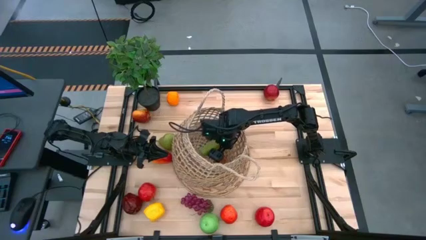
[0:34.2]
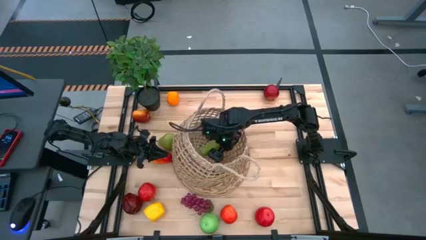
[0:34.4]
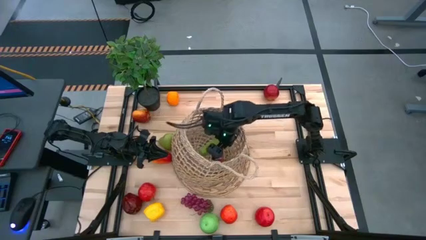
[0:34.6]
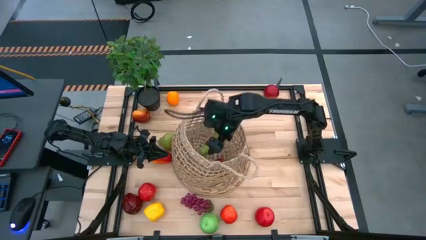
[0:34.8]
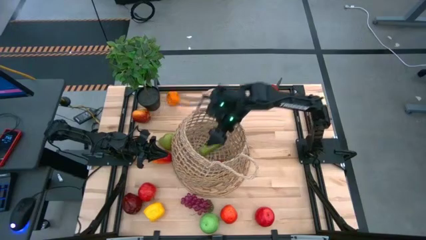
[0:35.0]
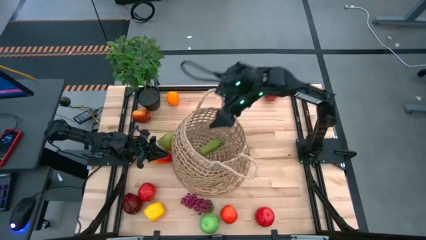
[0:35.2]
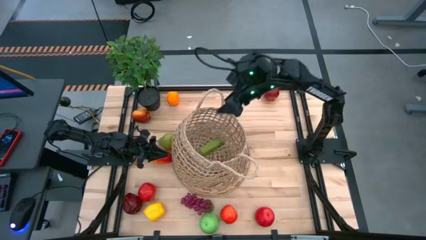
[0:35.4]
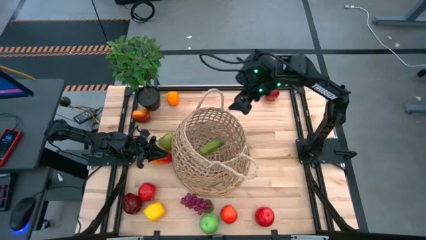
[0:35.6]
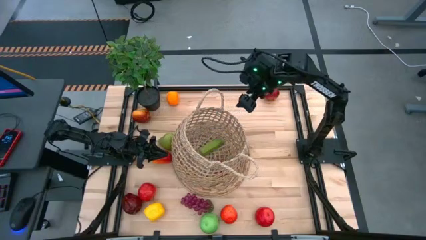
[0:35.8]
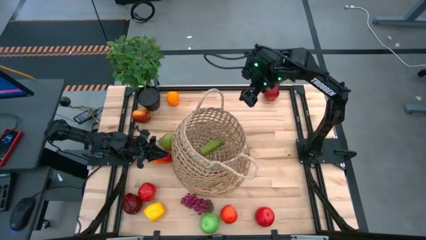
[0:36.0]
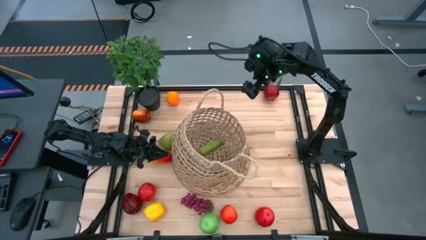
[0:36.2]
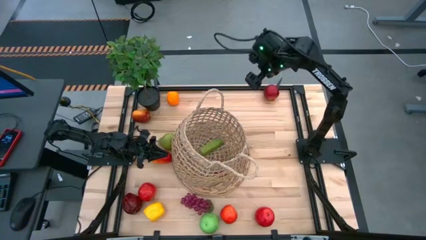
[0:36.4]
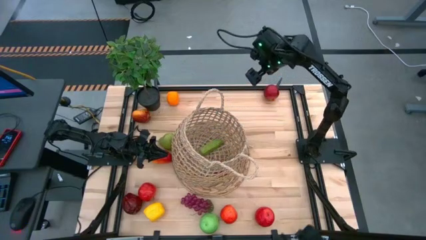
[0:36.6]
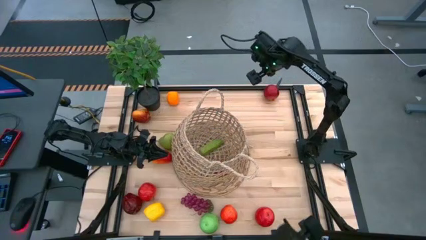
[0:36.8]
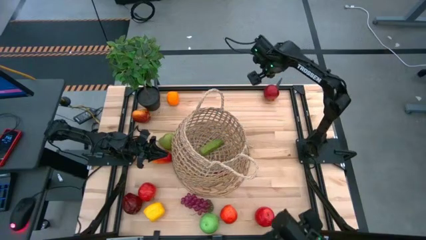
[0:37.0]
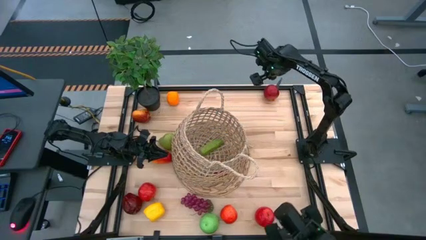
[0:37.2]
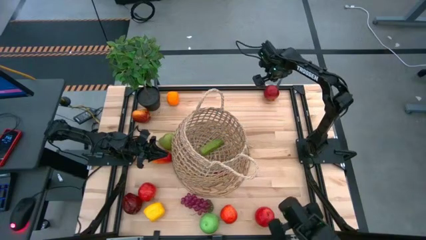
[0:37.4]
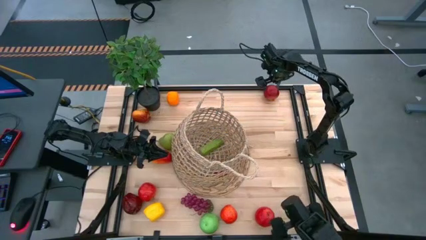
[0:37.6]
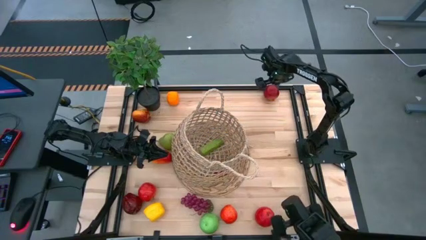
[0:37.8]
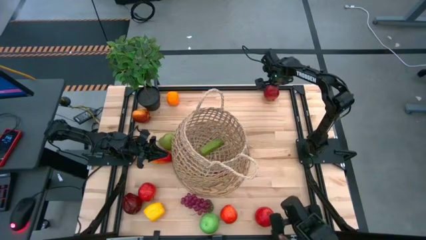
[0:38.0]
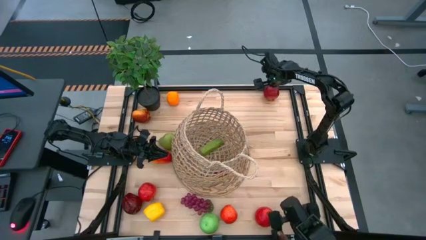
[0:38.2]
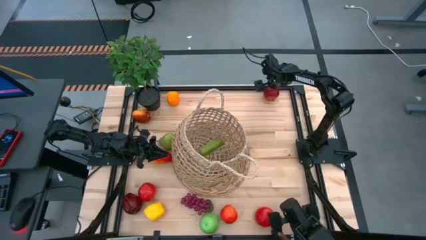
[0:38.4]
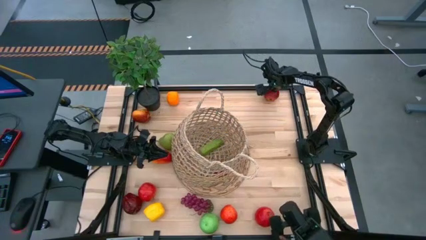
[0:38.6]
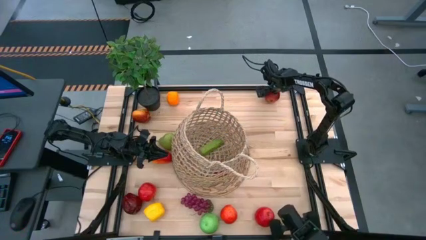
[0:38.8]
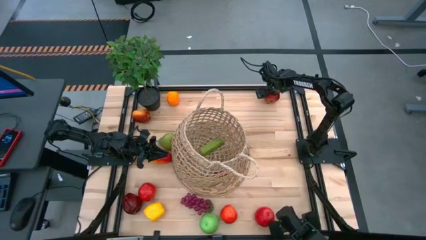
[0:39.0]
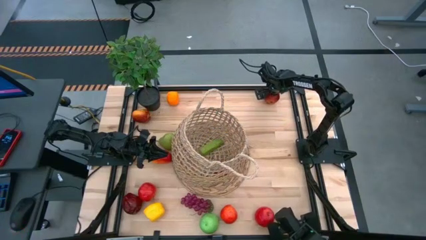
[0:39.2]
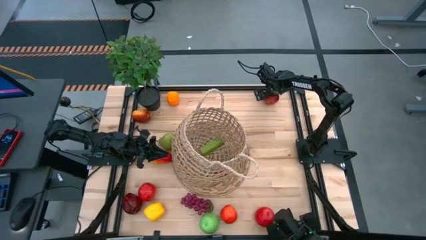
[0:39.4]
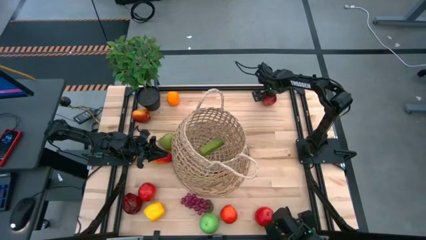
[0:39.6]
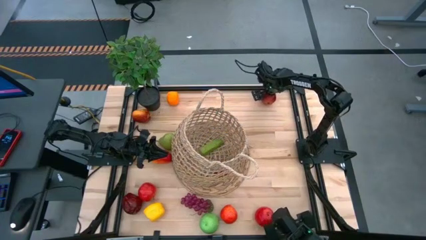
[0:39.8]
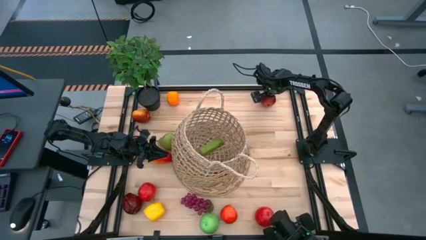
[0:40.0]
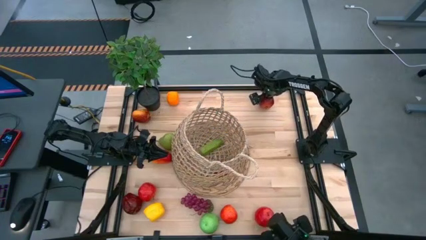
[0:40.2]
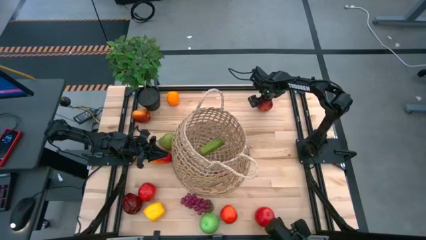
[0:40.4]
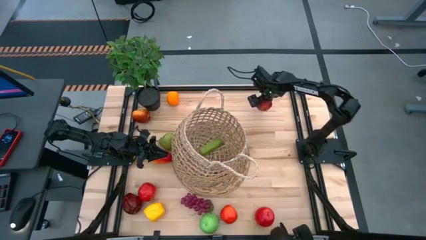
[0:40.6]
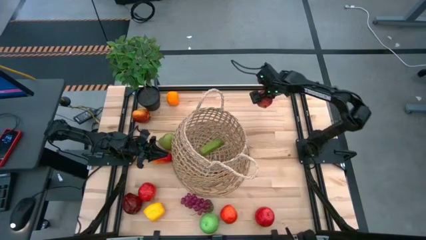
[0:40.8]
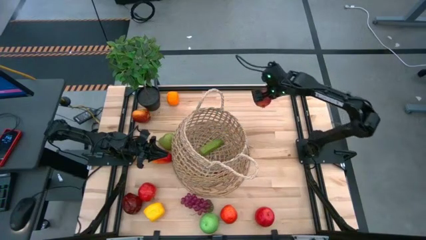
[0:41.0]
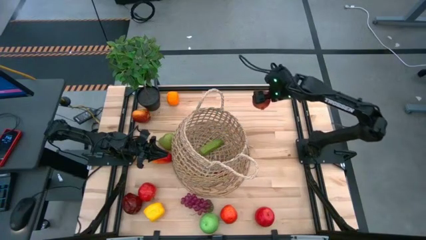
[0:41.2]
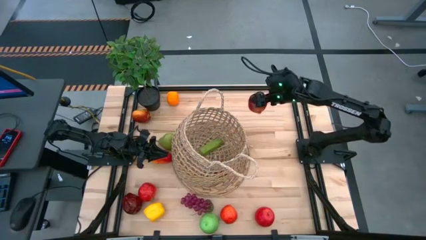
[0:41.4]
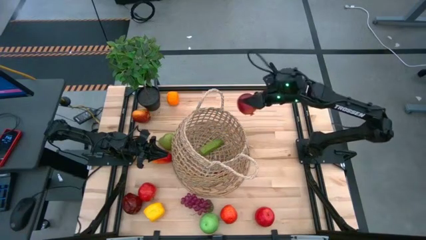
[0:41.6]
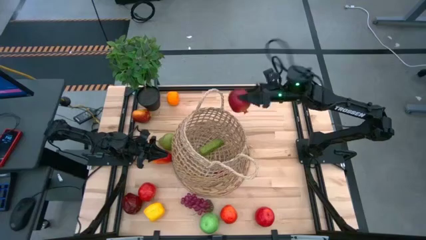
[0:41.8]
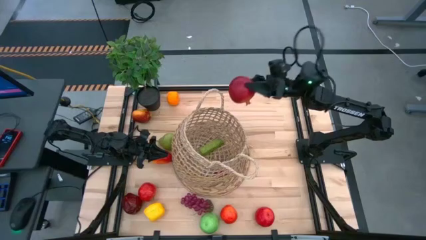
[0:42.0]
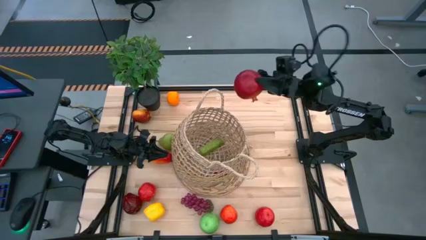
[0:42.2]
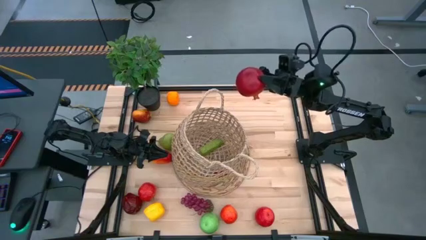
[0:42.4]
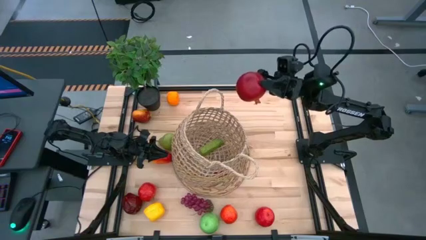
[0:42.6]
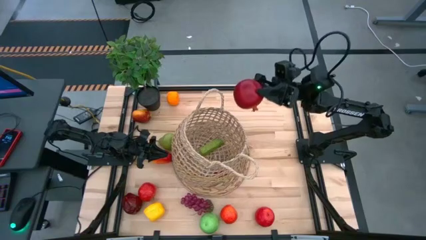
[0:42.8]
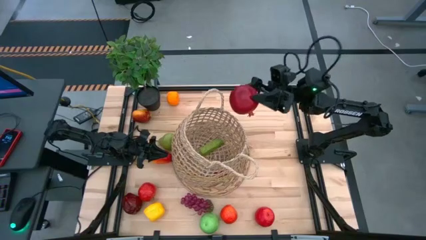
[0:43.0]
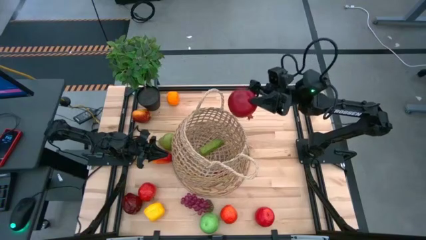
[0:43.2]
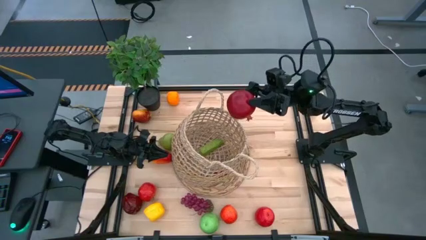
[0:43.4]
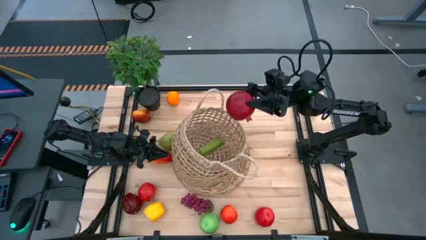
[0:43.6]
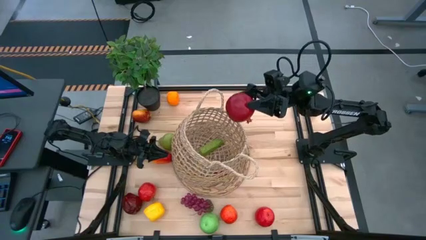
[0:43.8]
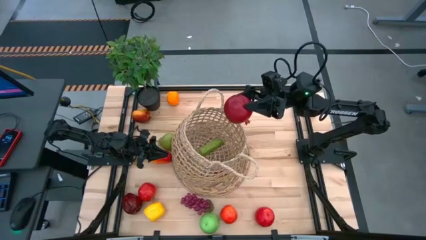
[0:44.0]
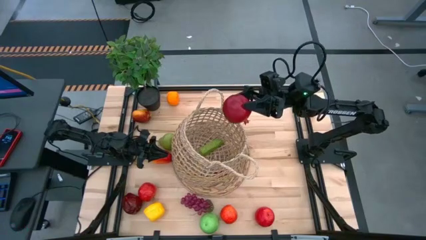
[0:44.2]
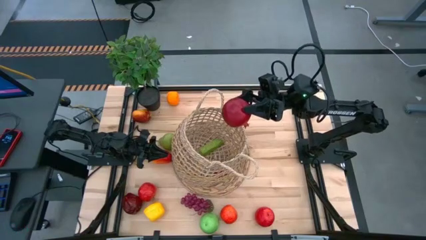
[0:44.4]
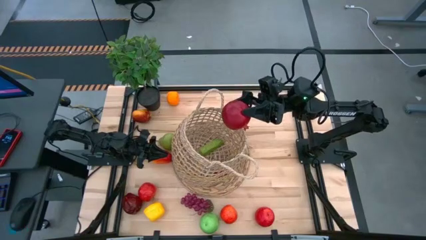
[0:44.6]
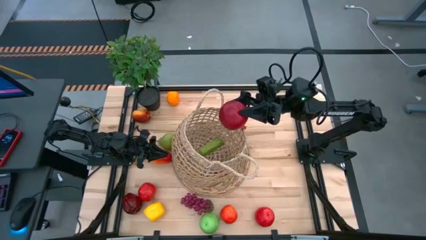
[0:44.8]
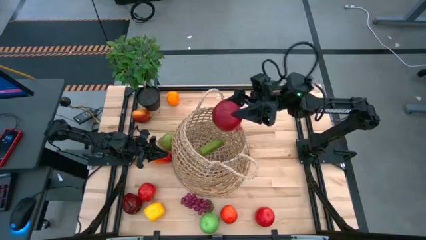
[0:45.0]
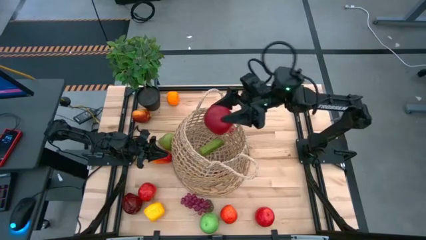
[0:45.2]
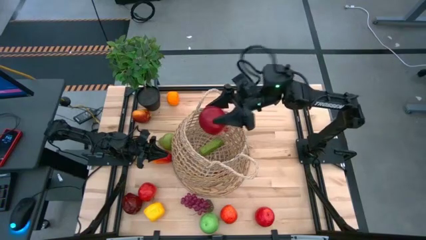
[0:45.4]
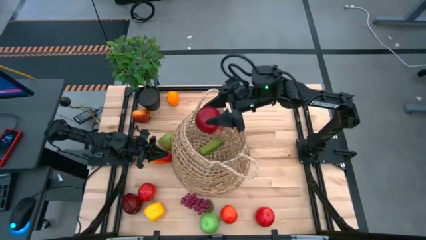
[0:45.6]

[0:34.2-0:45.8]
Task: Build produce basket
Put the pomegranate into the basket
